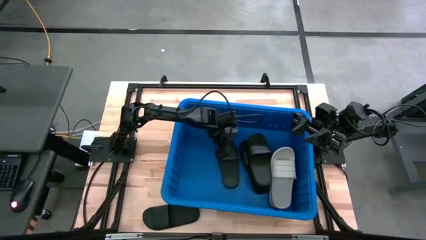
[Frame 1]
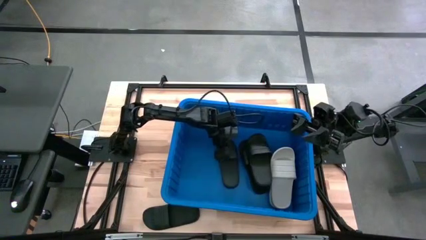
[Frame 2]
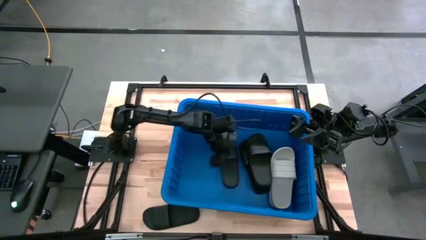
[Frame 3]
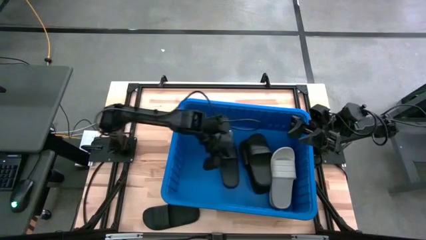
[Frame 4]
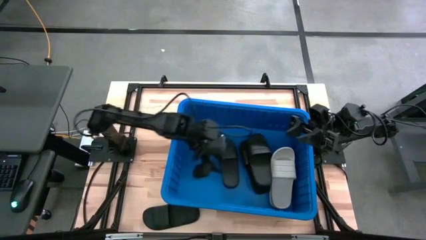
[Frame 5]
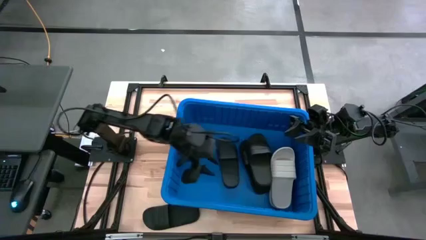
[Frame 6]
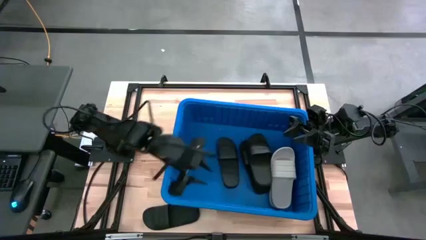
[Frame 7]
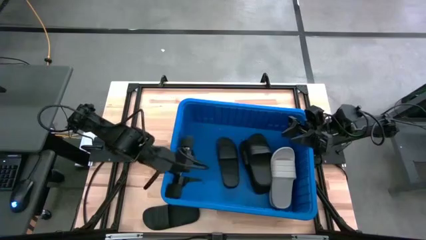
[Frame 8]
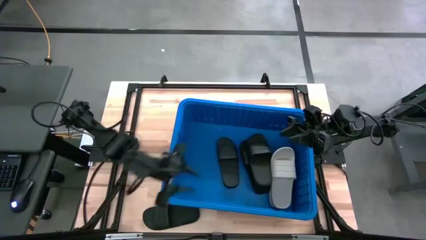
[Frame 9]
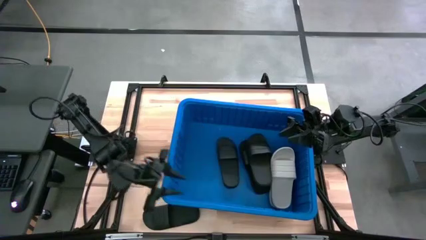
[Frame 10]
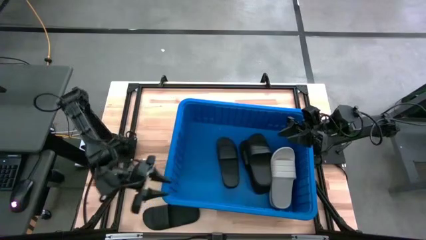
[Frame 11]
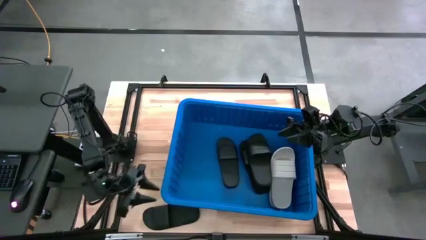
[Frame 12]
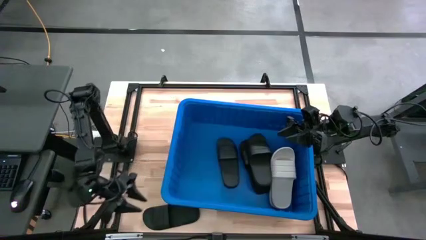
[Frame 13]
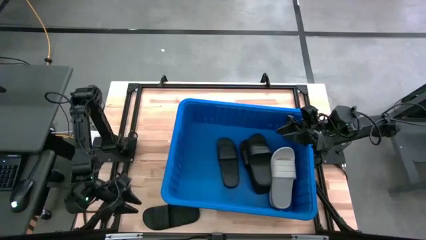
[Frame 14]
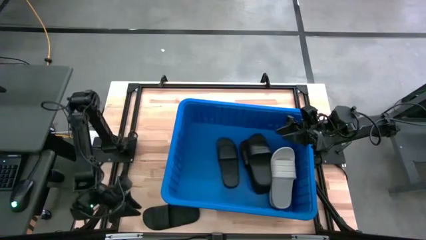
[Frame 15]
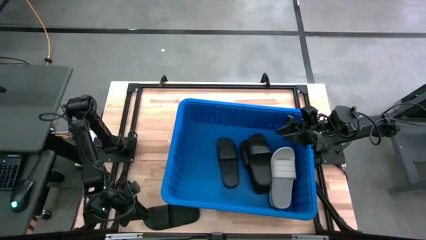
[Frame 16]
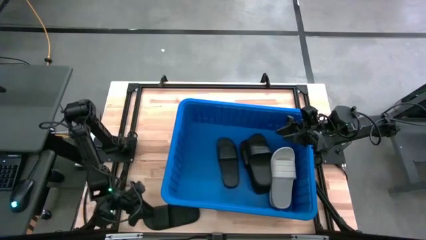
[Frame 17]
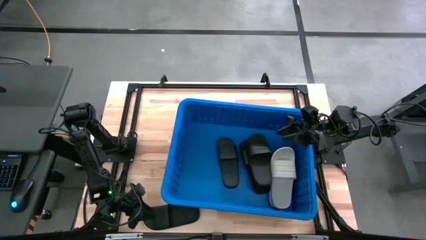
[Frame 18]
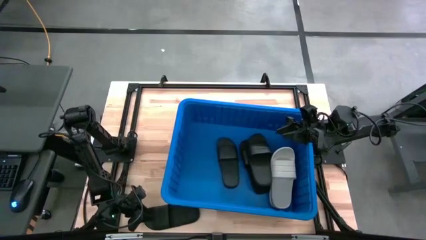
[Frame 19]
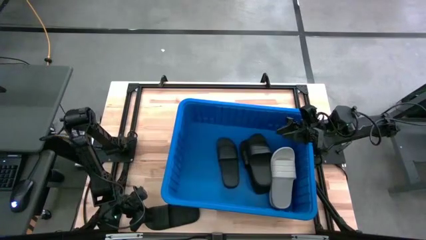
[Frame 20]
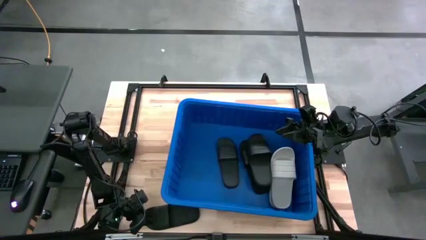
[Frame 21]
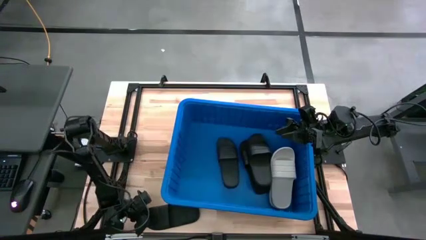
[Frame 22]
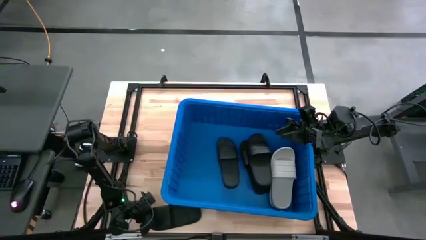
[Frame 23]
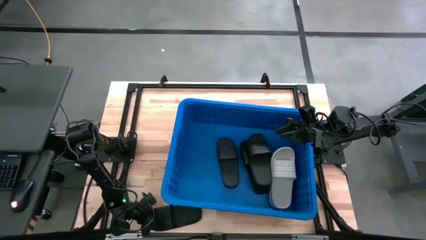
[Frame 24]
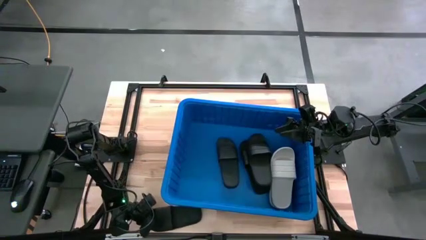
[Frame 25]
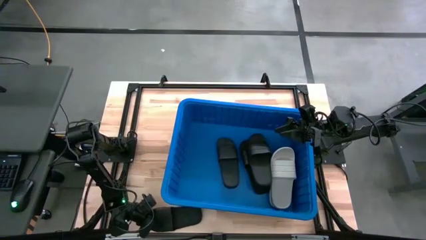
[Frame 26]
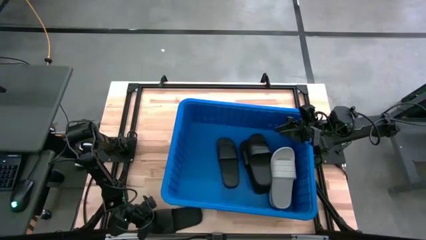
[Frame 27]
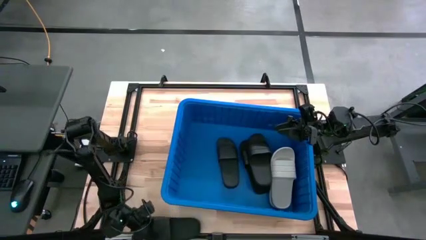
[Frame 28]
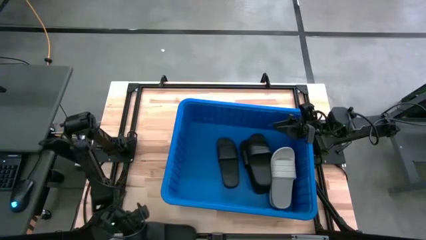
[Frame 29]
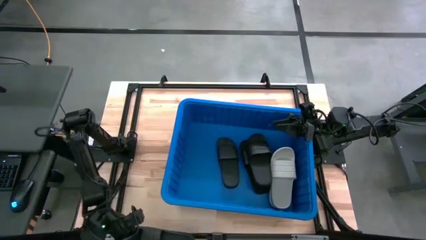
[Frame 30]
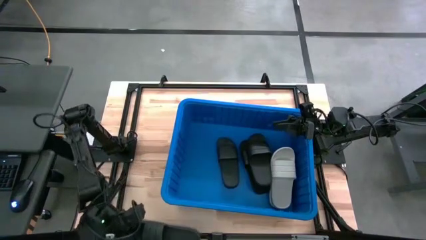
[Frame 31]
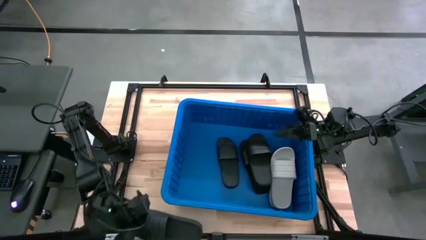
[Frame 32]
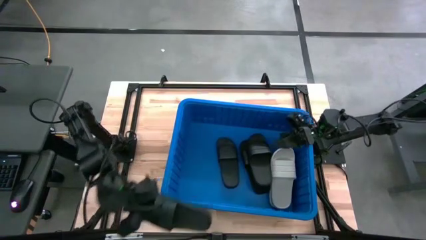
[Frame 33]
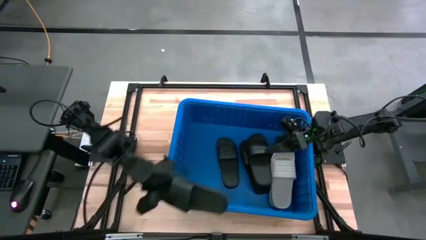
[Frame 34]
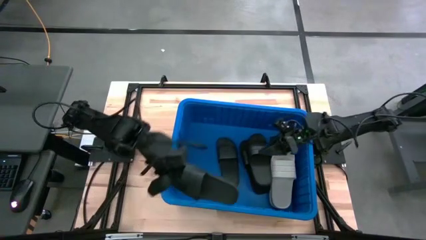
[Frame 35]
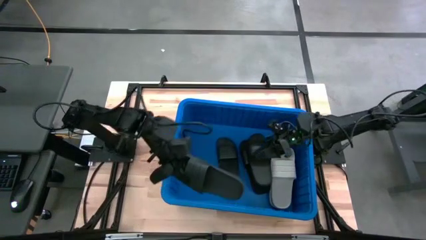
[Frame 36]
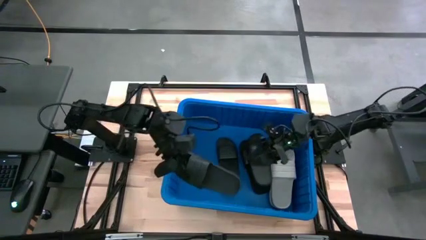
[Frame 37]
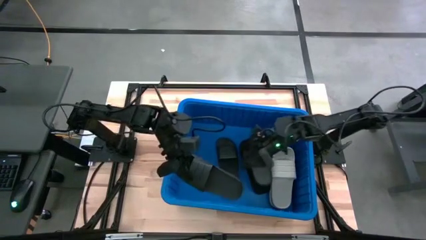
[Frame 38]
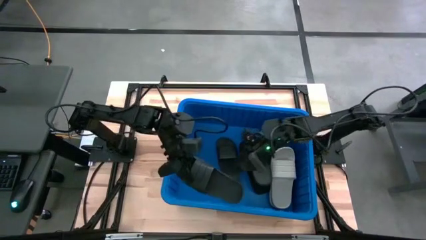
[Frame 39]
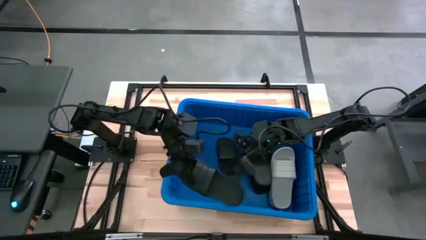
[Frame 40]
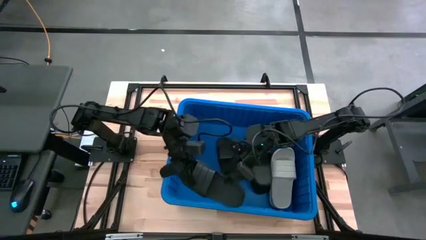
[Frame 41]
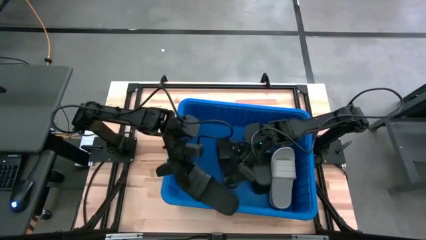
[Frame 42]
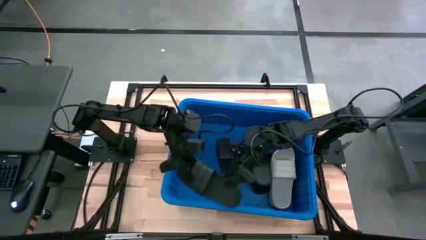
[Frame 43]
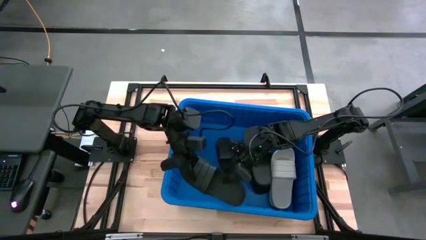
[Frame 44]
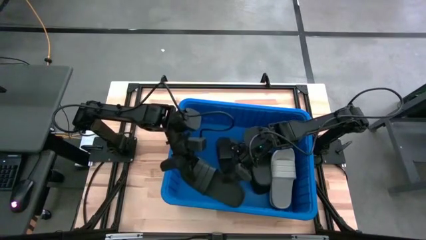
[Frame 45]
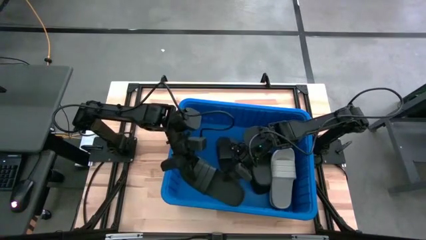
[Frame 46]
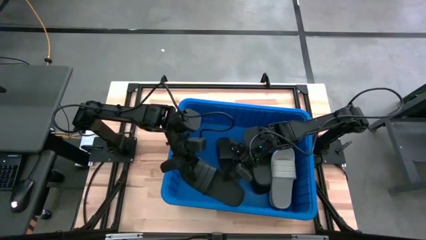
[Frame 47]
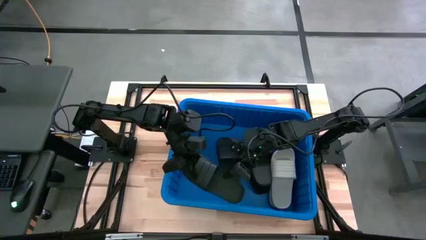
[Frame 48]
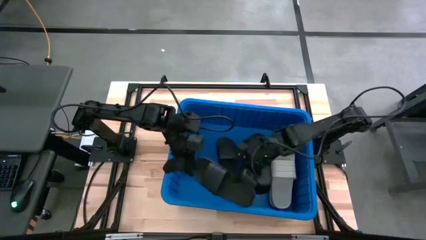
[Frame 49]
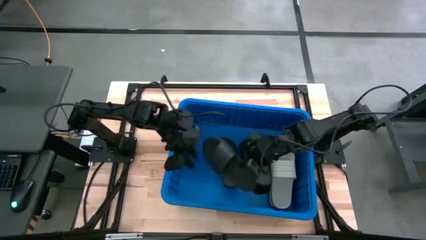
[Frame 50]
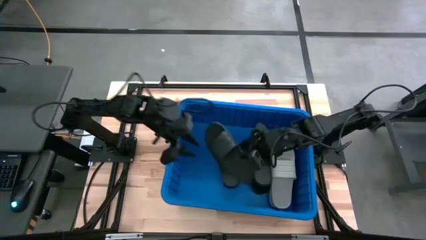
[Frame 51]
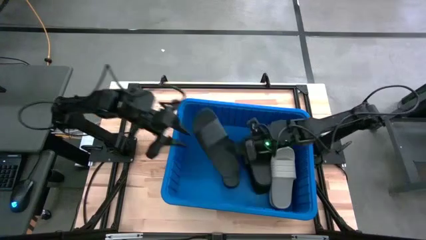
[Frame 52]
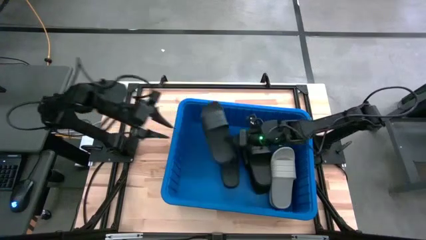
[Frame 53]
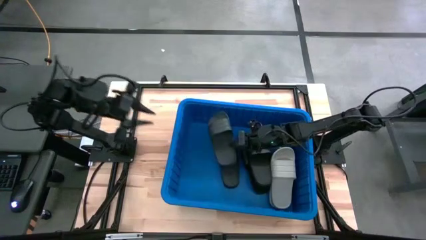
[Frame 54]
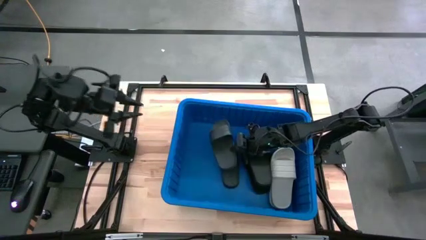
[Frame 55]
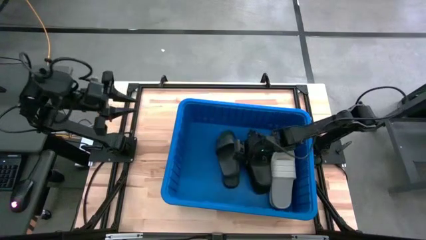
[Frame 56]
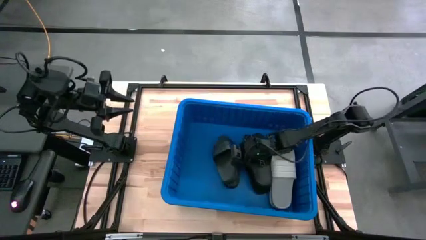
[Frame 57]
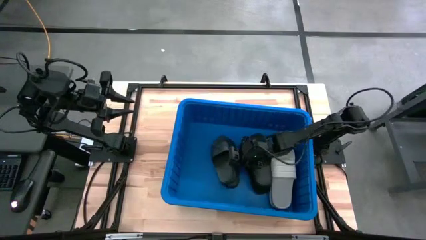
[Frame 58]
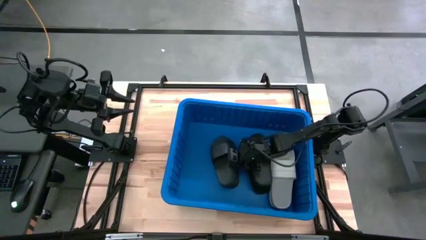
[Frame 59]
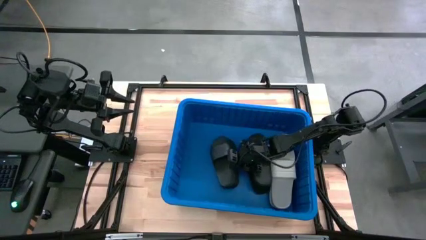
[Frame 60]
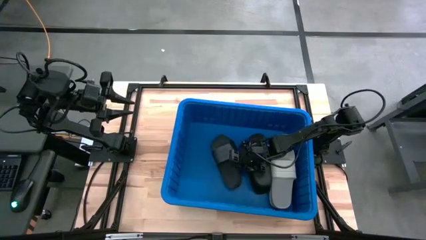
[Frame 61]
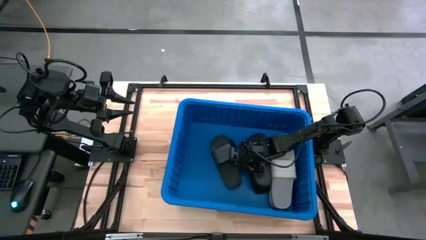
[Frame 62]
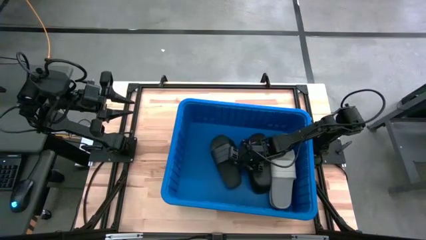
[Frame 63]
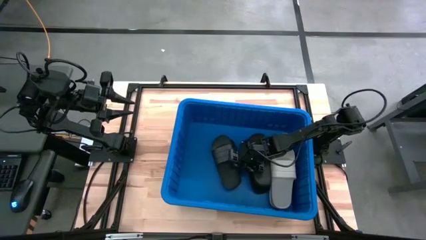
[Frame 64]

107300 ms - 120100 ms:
Task: Pick and place slides into bin
Put the black slide into the blue organizer bin
